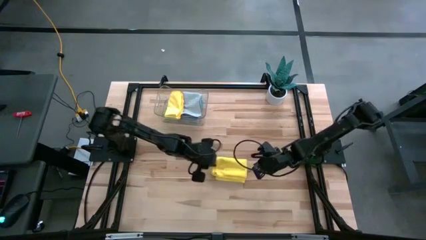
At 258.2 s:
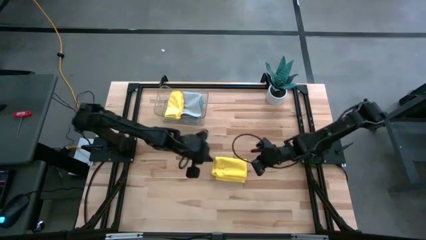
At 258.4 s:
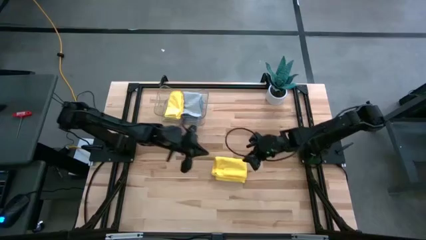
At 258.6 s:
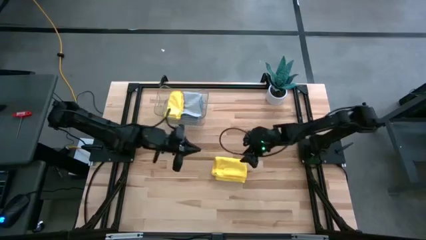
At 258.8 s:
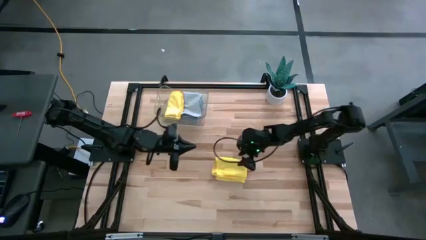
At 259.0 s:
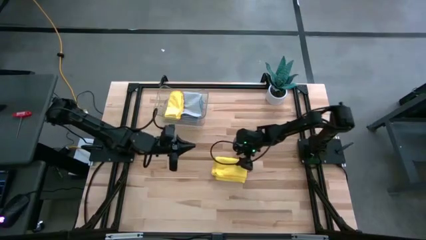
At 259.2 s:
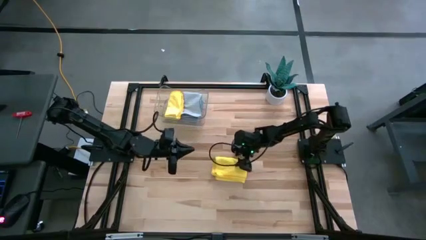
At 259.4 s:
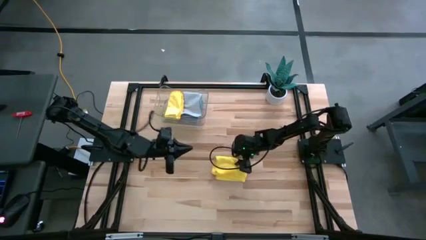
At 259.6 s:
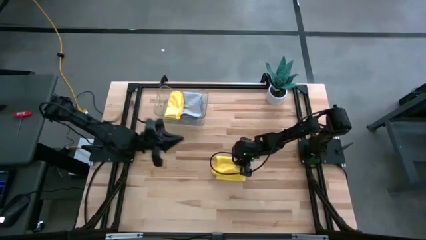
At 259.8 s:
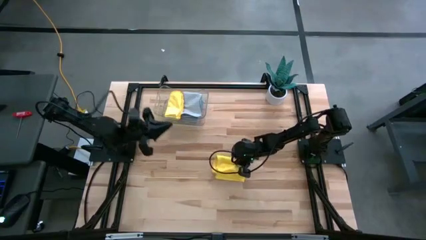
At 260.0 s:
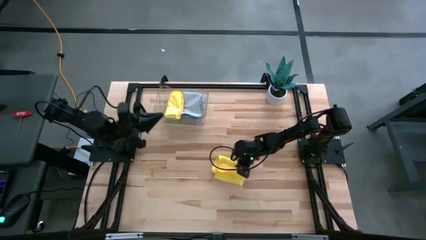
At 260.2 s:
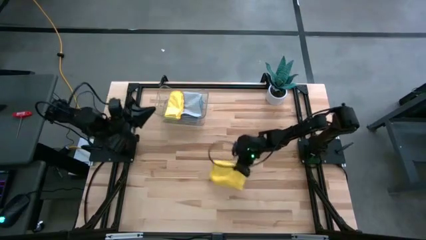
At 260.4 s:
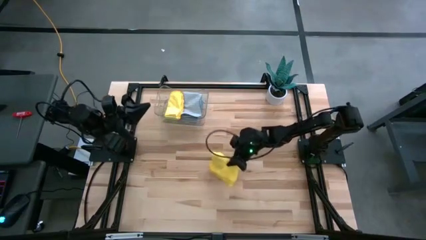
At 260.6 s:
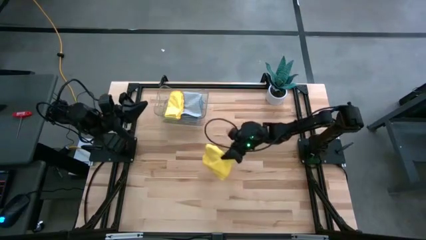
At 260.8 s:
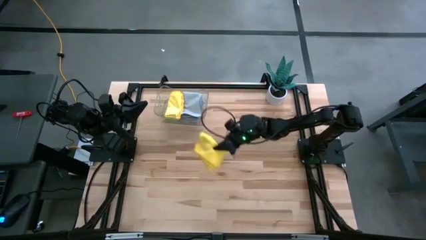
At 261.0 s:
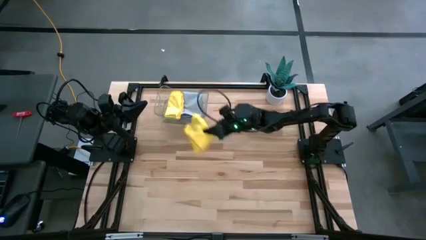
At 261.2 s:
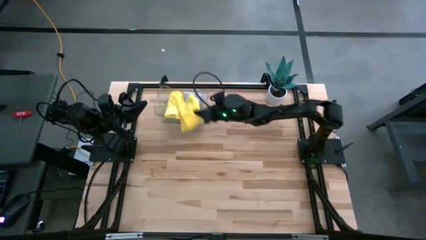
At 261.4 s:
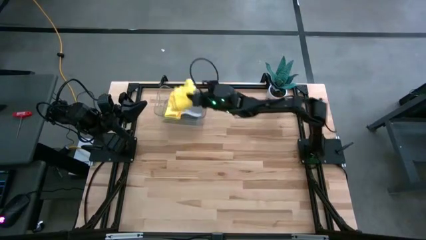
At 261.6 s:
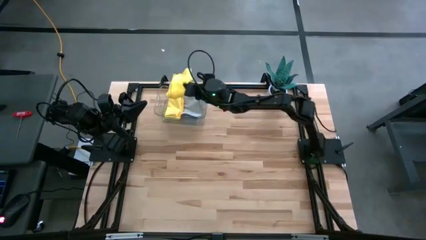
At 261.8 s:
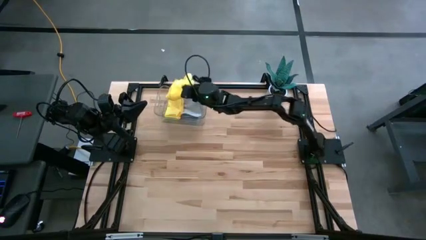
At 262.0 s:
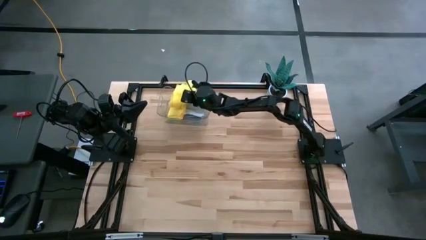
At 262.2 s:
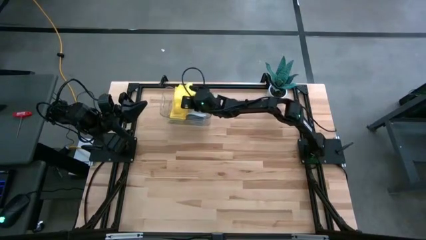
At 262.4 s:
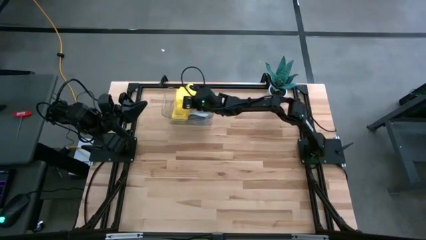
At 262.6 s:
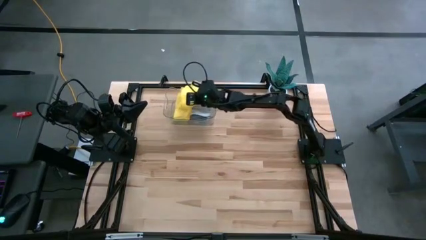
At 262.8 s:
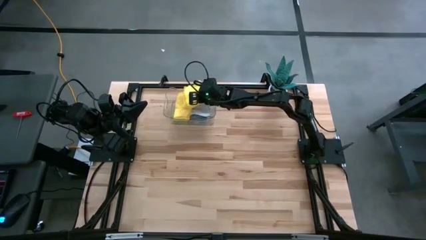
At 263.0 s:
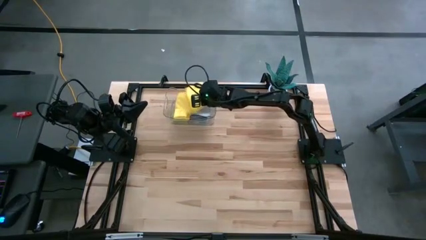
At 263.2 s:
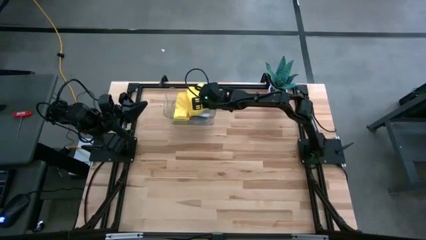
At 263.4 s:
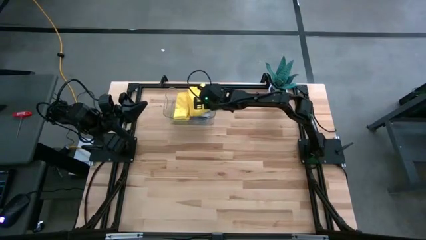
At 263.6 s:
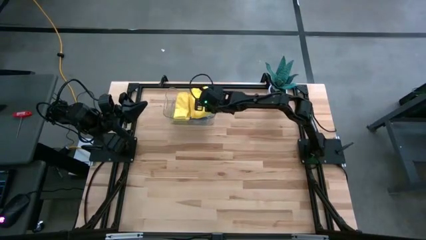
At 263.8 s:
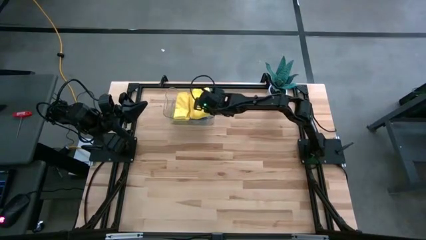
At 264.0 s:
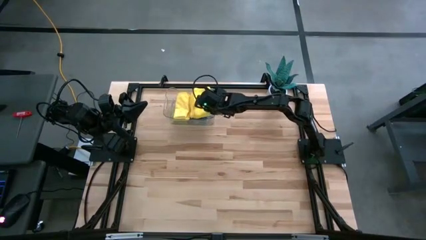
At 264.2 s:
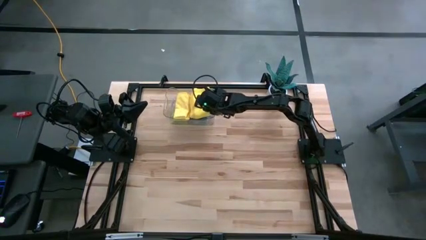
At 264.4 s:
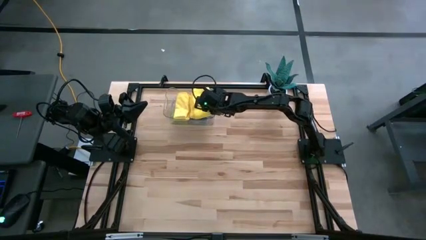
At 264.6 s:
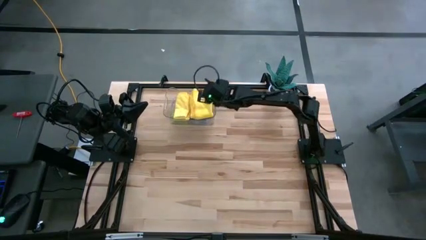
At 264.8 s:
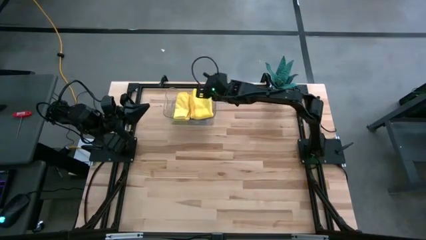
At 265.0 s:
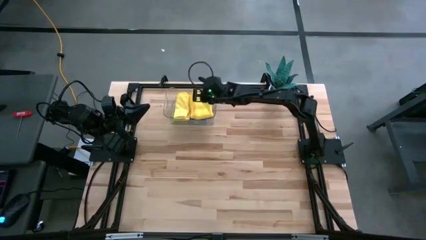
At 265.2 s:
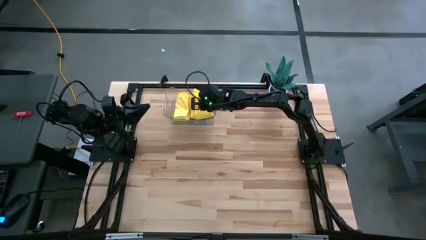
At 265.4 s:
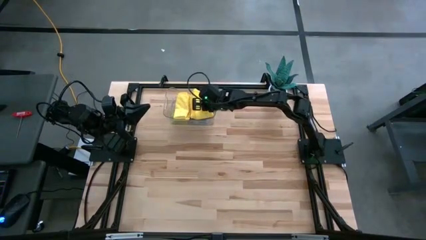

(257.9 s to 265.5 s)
Task: Fold microfiber towels
Put the yellow towel into the transparent bin

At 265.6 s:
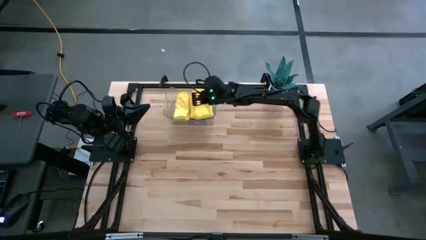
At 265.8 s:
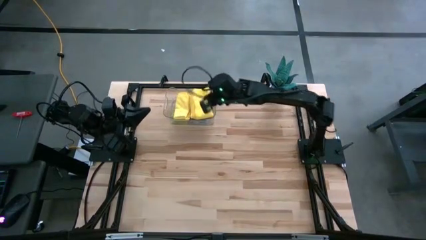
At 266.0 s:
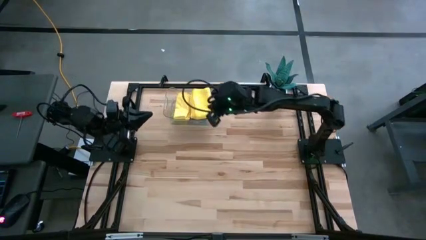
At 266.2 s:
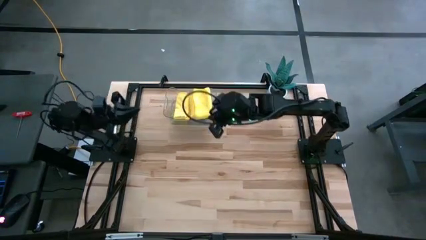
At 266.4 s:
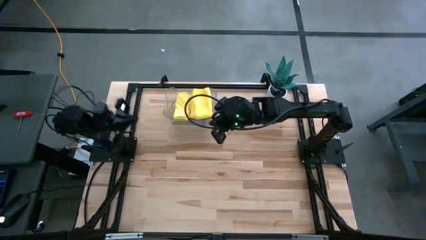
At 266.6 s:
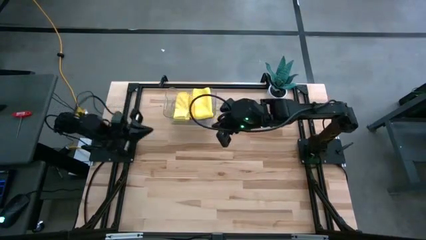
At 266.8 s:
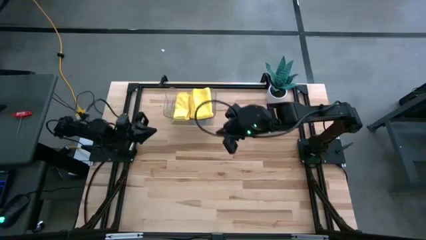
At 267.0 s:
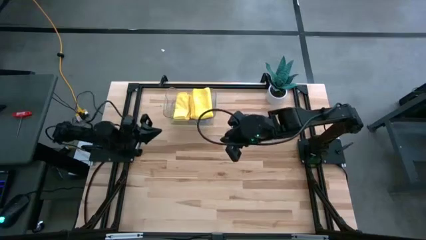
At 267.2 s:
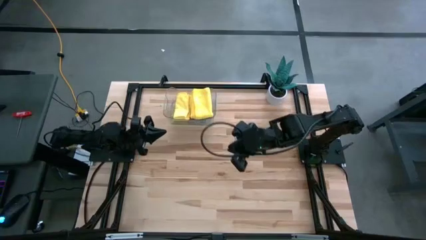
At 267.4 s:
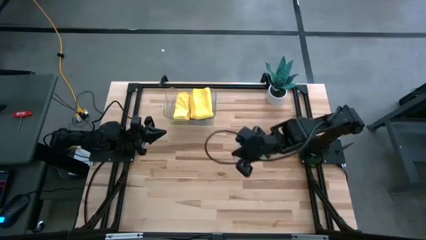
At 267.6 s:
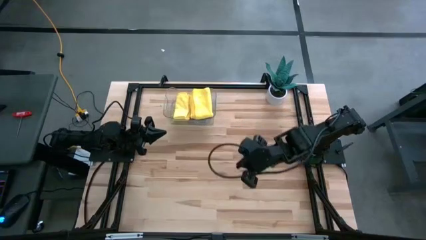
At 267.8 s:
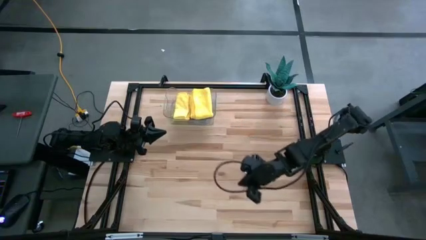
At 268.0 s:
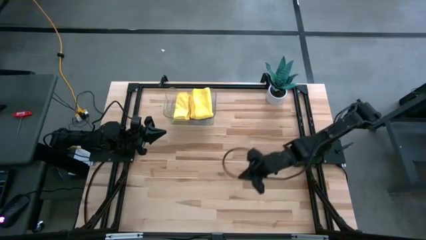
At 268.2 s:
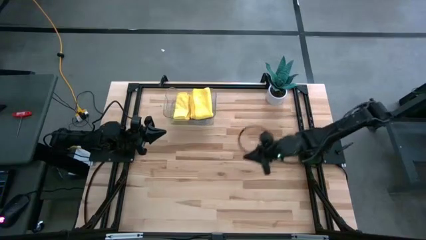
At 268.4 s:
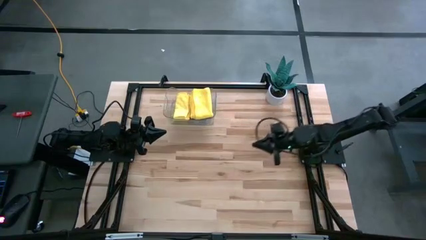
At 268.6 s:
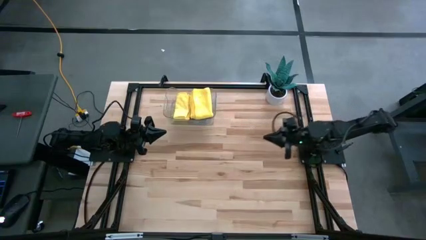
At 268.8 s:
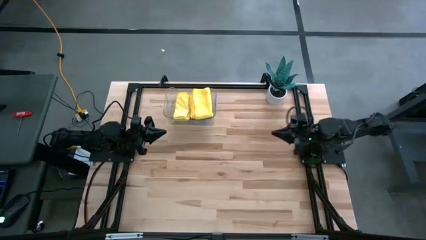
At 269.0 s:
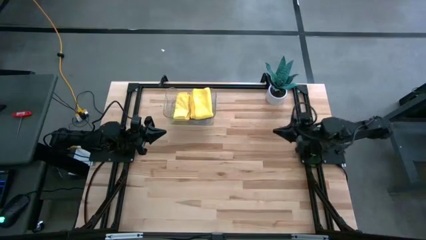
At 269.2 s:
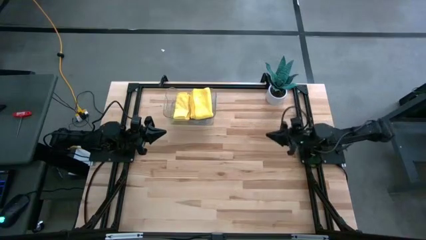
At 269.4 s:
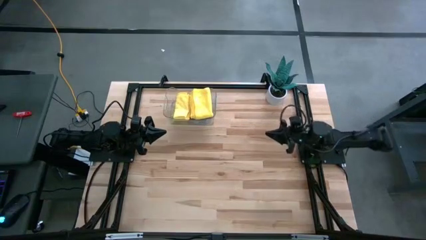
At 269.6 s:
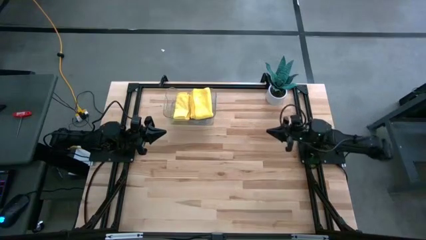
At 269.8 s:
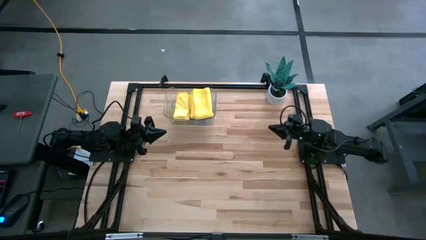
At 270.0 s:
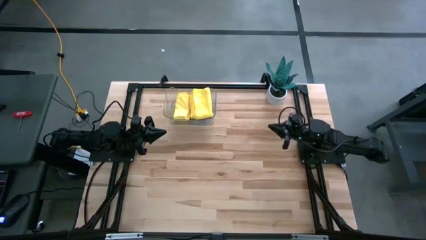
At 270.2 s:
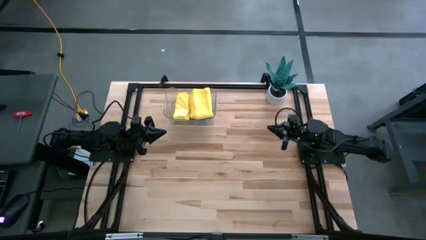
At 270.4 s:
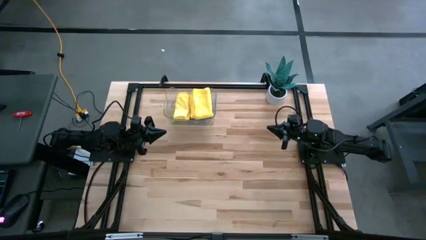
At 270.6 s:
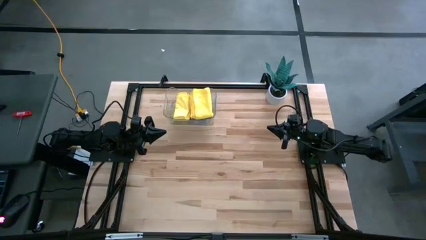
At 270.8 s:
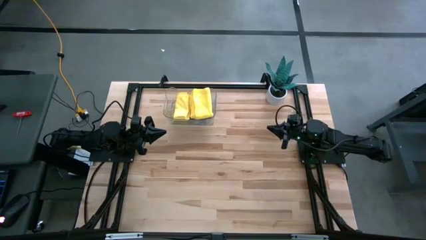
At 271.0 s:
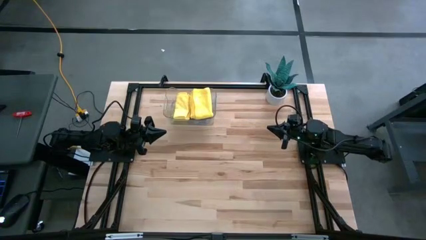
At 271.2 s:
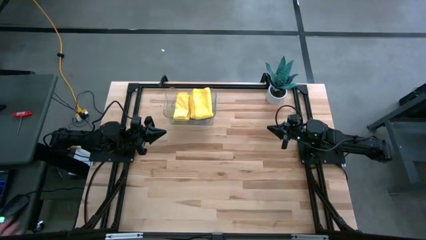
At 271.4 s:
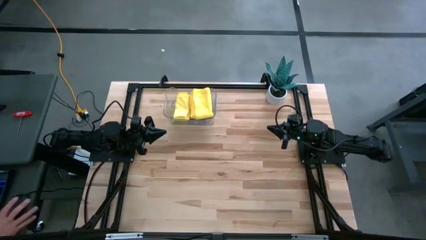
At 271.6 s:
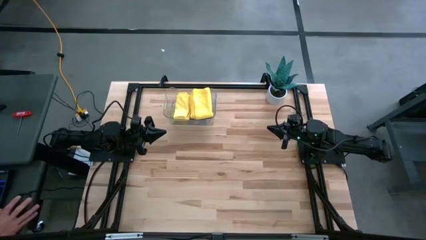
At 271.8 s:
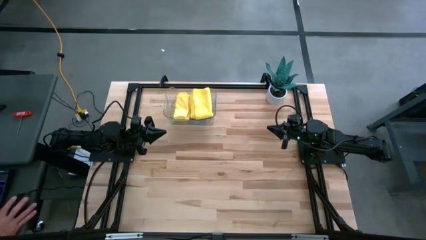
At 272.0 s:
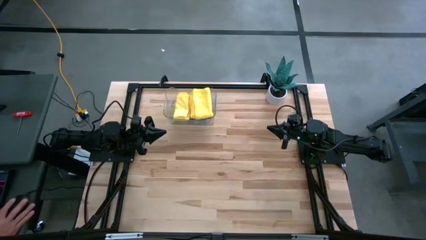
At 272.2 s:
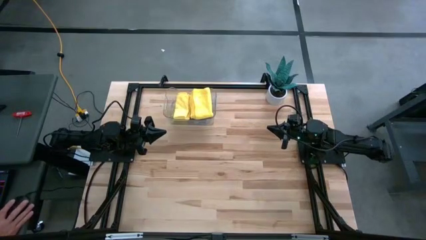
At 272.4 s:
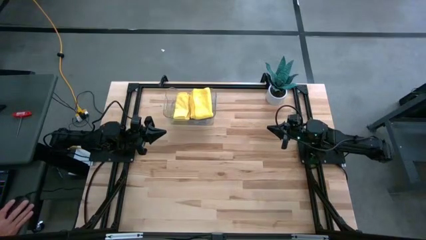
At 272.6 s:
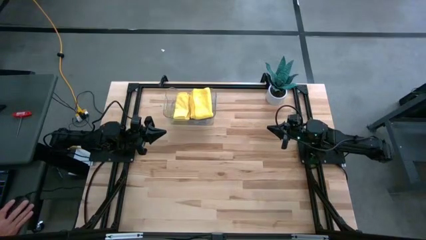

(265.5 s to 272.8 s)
Return to Home Position
